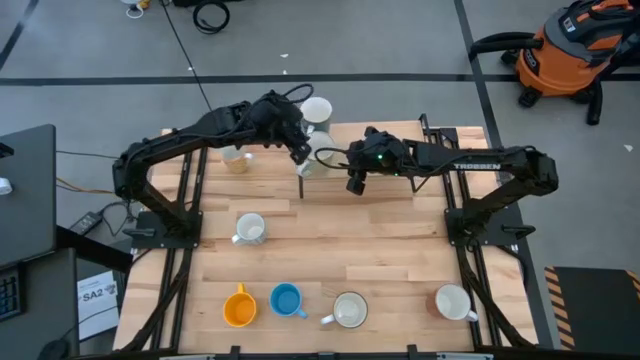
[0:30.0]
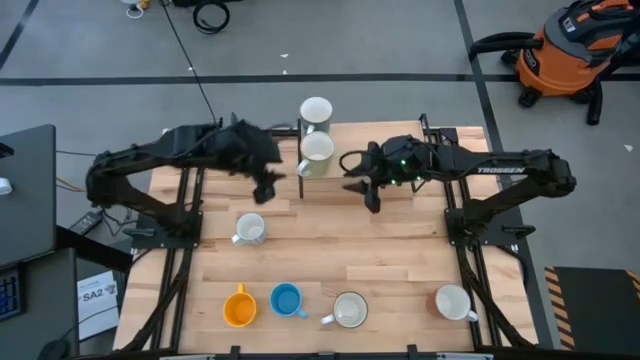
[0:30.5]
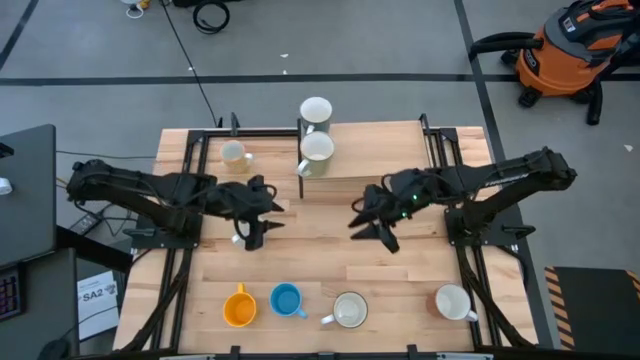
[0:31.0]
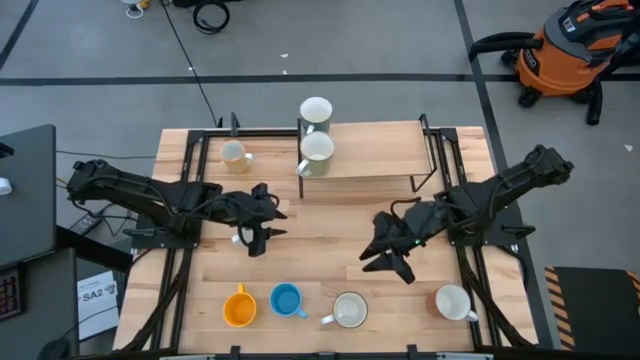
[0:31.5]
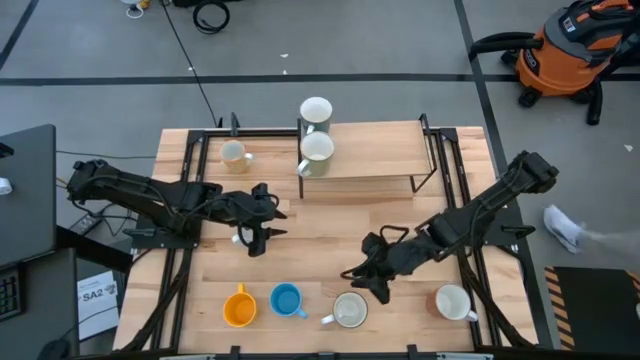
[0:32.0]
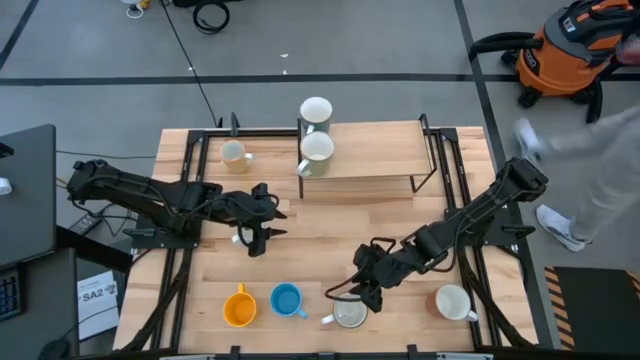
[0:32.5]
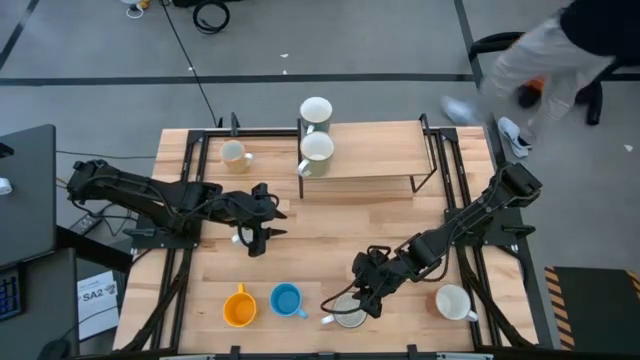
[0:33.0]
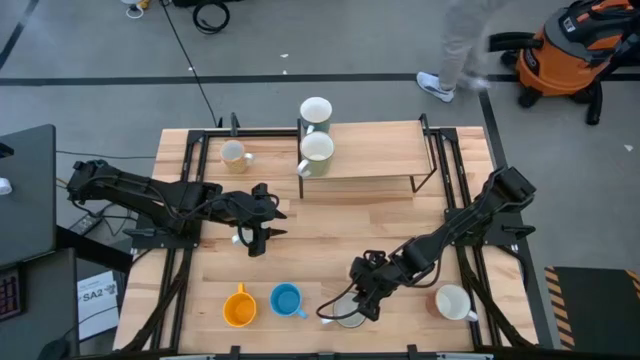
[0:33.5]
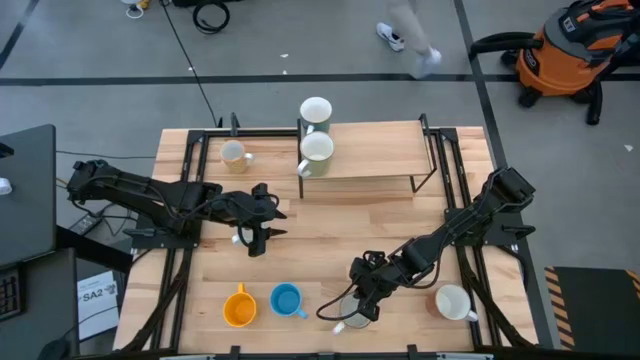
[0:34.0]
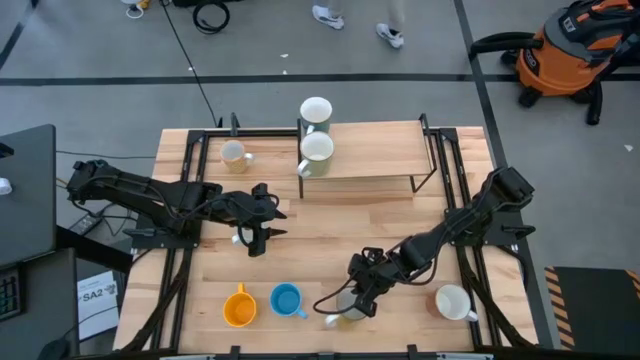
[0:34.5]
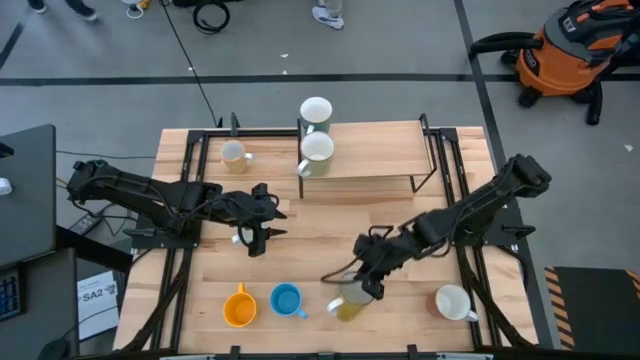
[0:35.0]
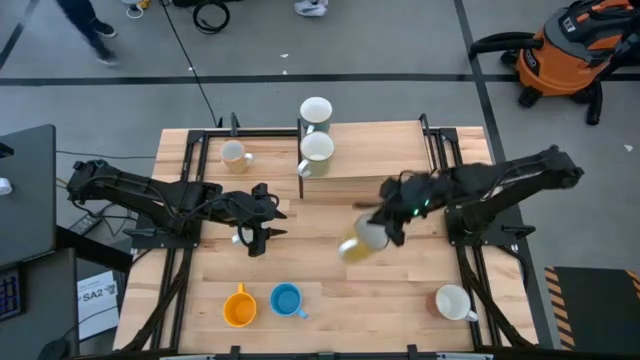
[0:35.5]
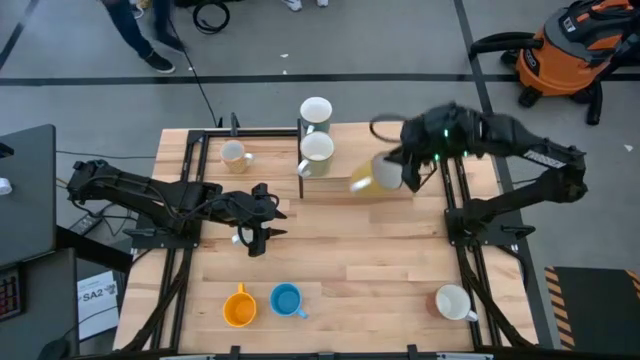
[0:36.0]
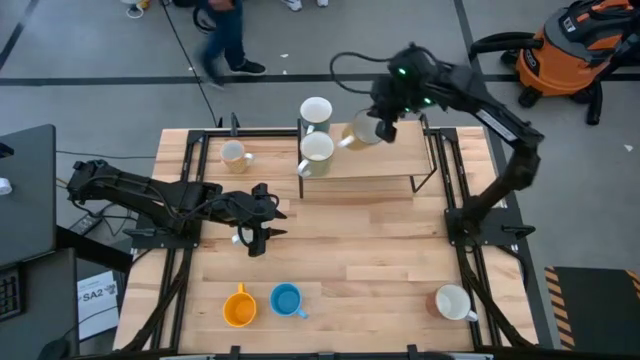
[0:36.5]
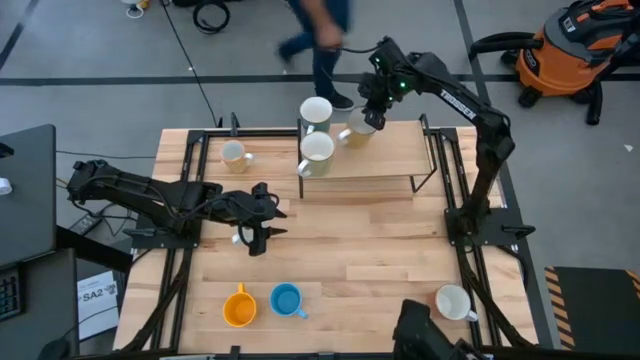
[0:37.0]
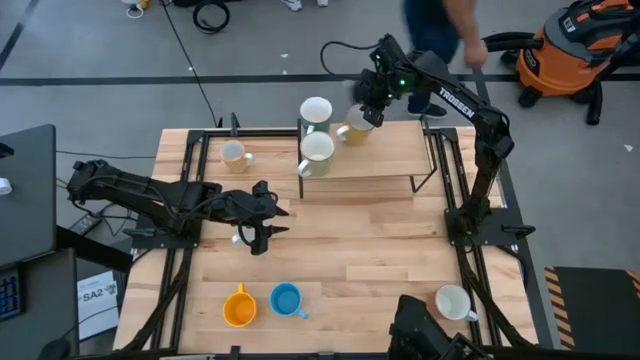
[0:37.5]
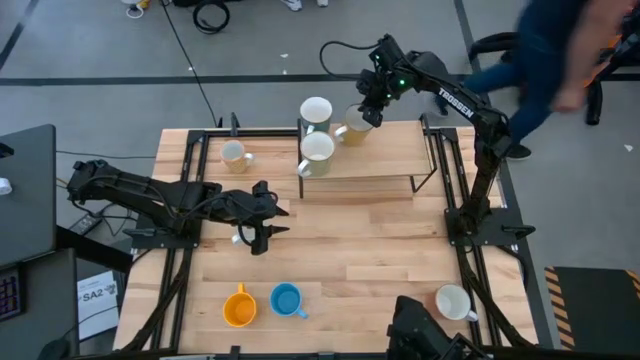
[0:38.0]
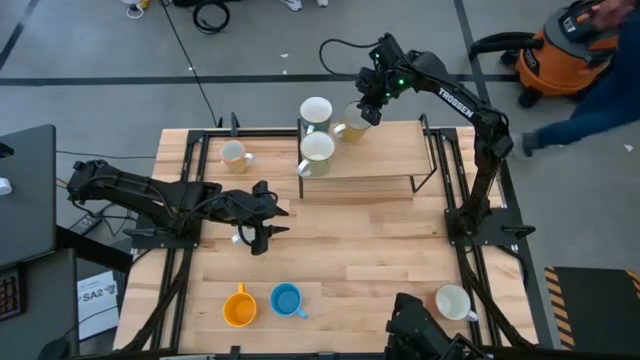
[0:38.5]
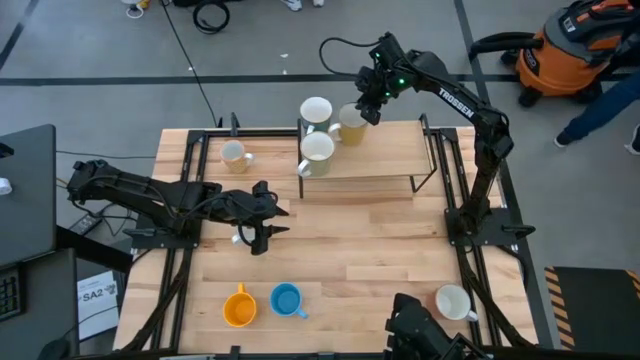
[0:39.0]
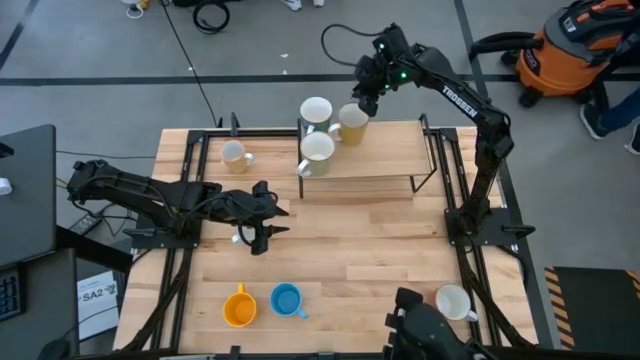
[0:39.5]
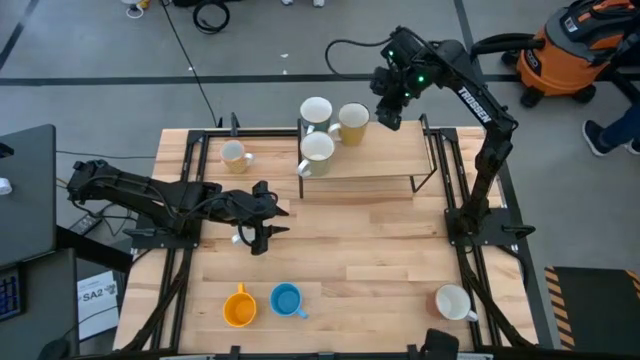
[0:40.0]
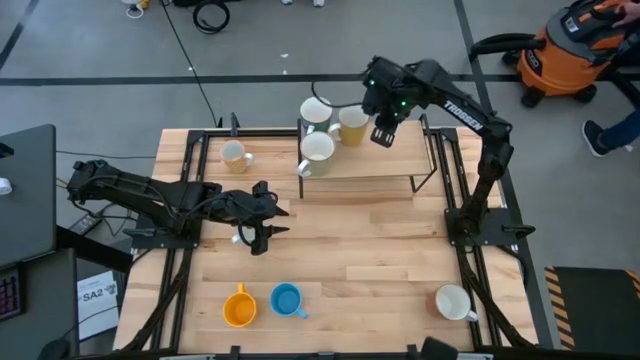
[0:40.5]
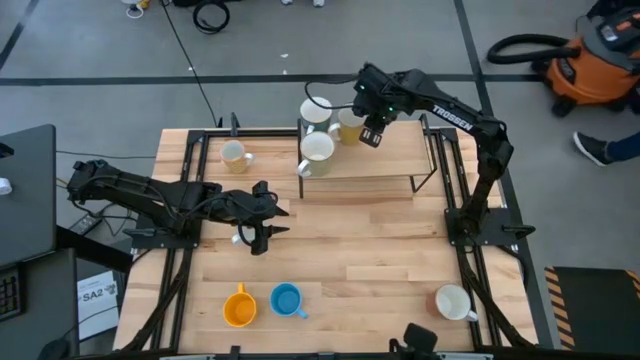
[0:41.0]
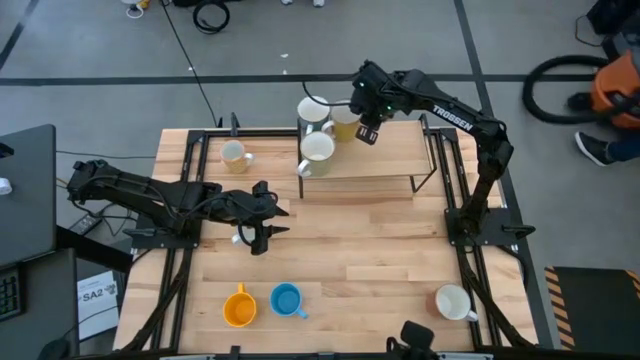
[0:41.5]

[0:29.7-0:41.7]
Task: Place coffee mugs
Put the right yellow mug on the shelf

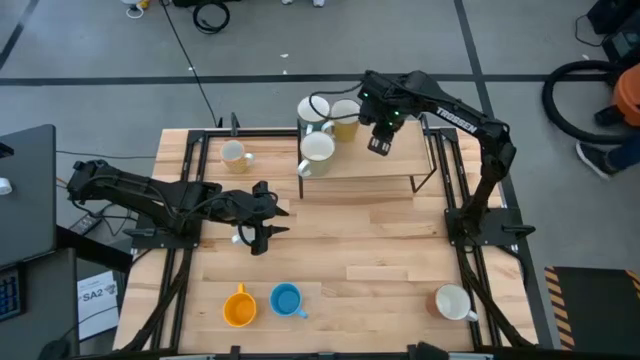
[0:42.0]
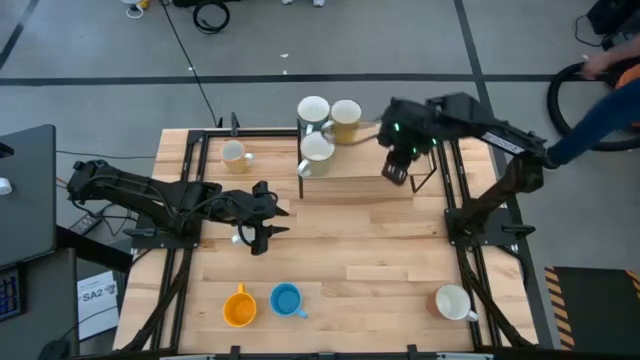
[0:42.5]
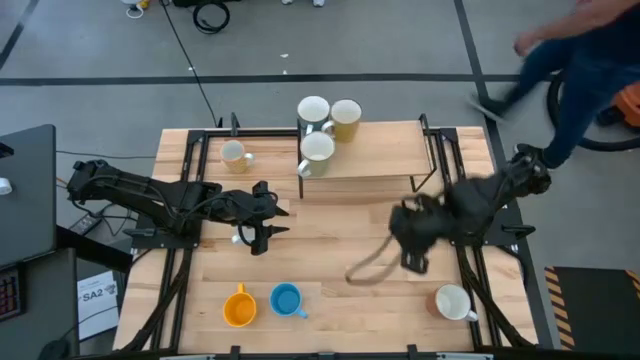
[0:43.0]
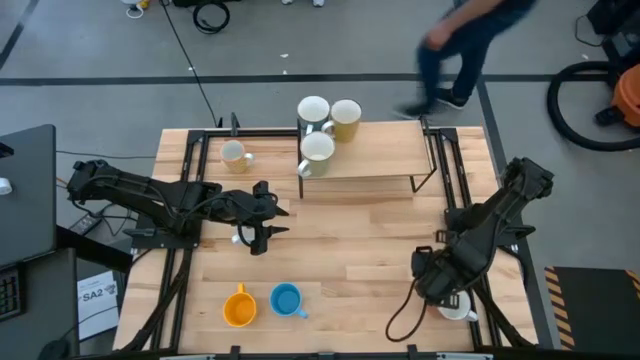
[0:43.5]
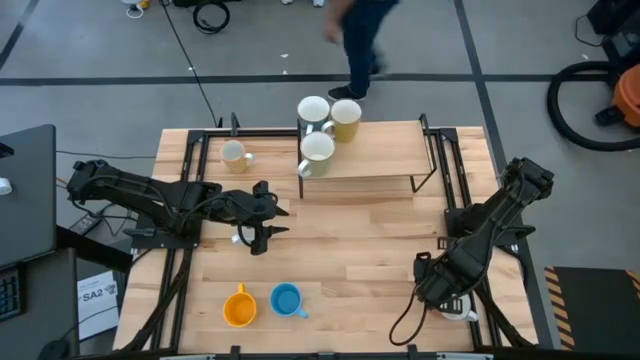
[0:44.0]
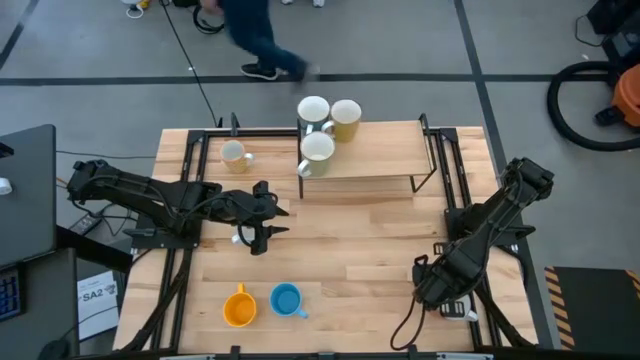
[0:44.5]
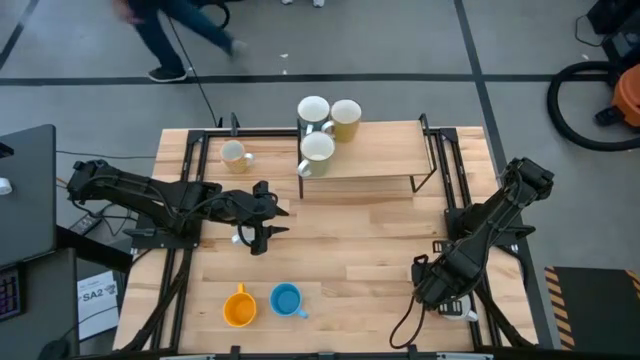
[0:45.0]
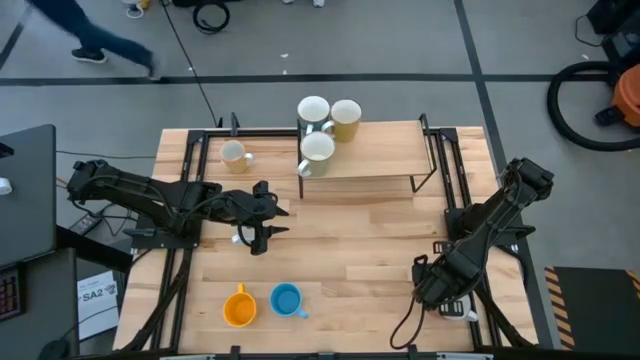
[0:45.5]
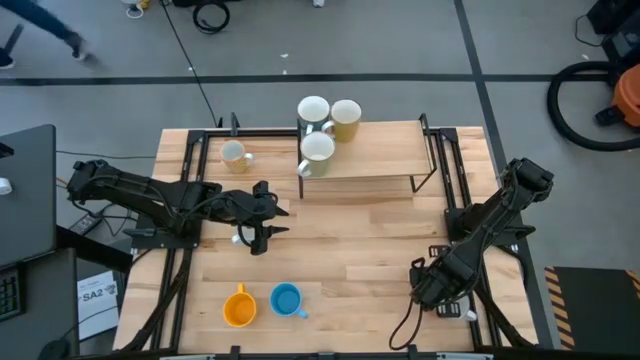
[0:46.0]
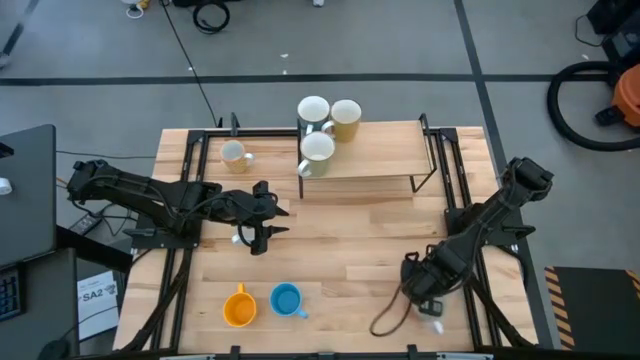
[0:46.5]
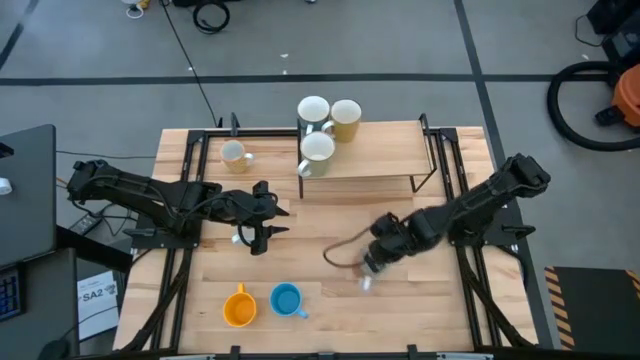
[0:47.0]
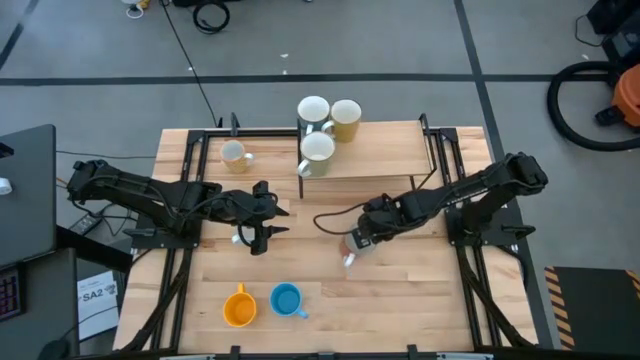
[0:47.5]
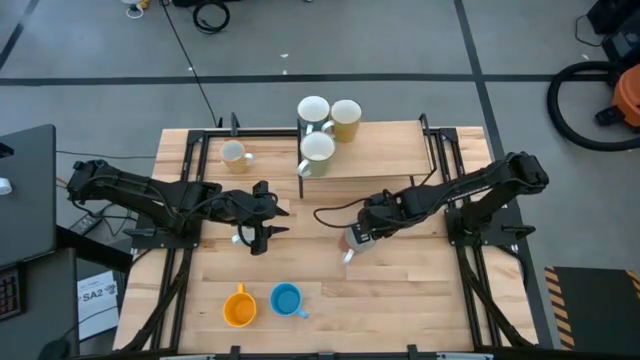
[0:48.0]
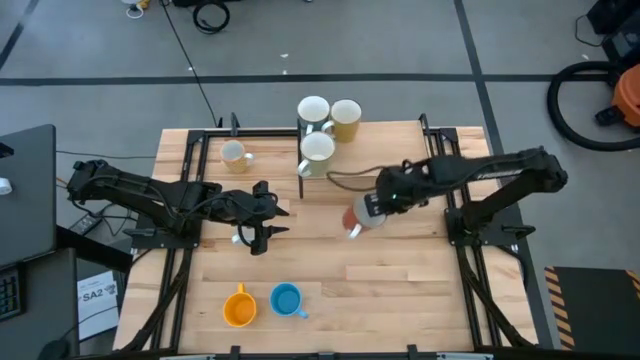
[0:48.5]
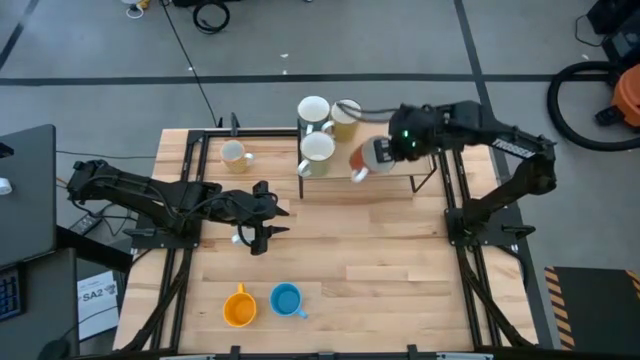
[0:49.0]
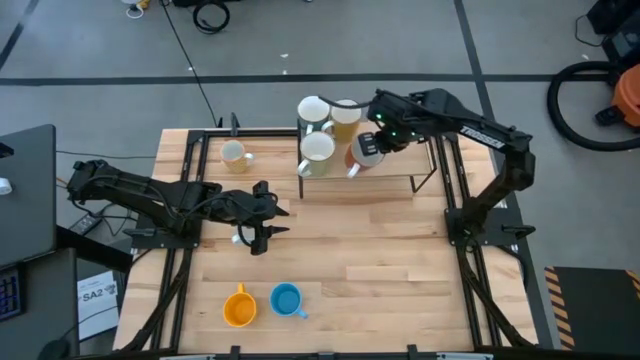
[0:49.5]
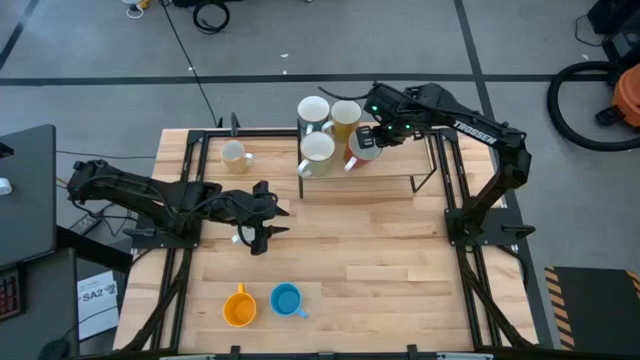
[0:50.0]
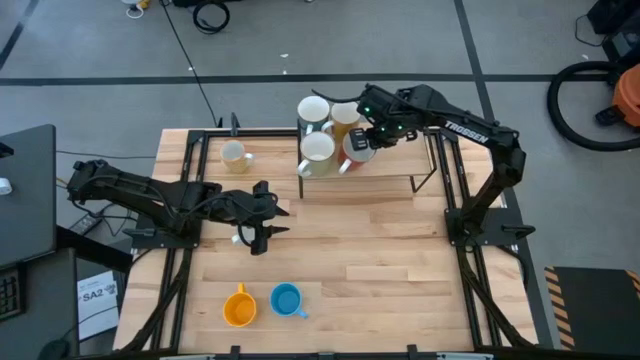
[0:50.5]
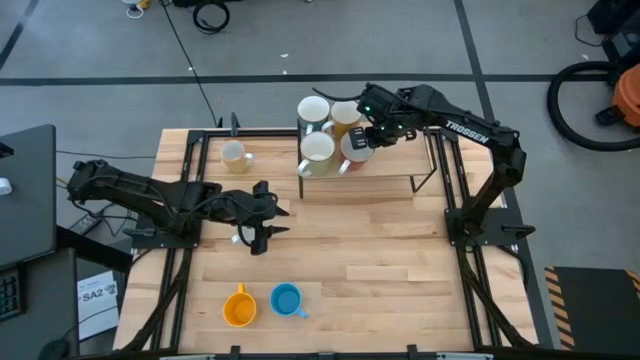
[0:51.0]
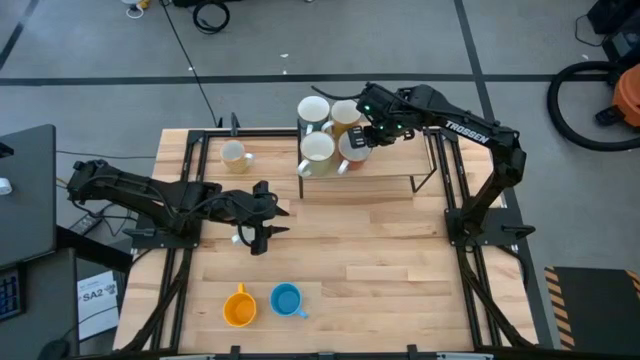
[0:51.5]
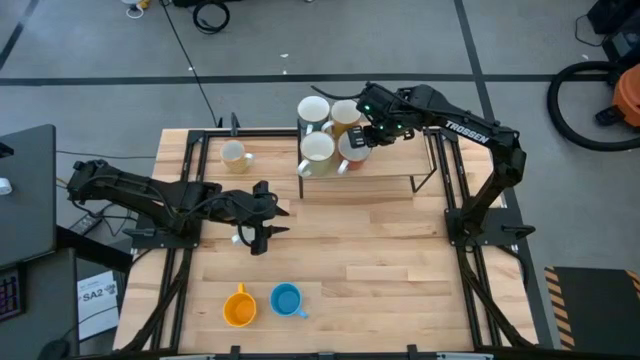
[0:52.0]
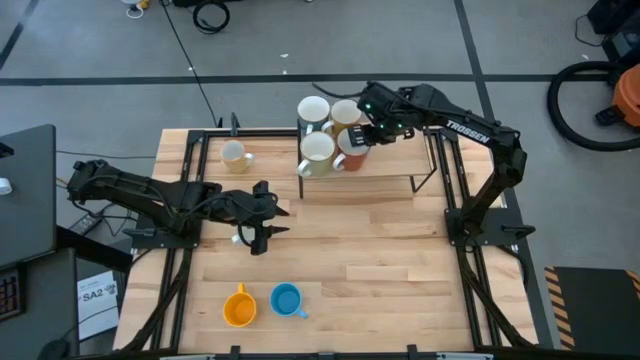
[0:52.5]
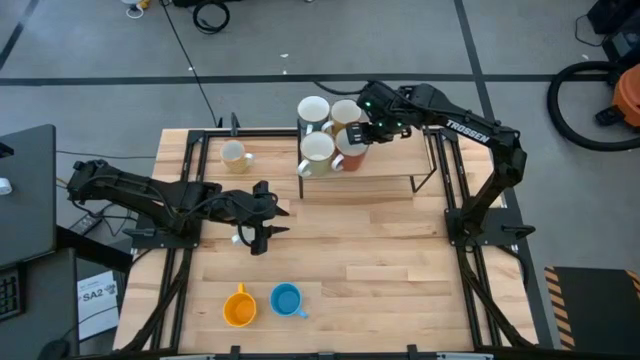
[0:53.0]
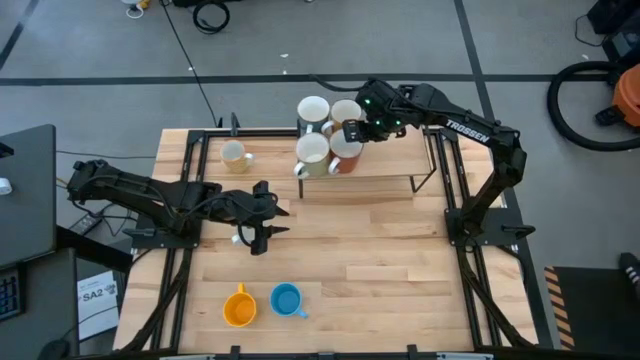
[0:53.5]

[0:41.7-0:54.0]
Put the orange mug on the shelf
